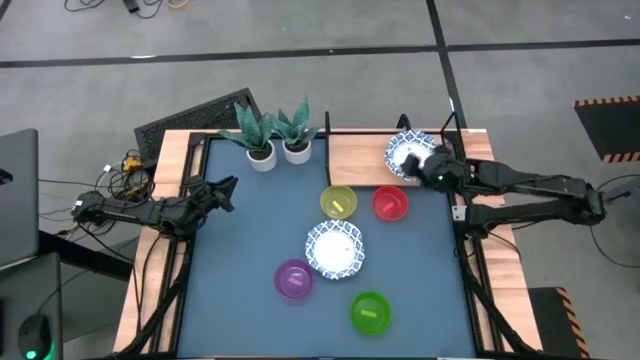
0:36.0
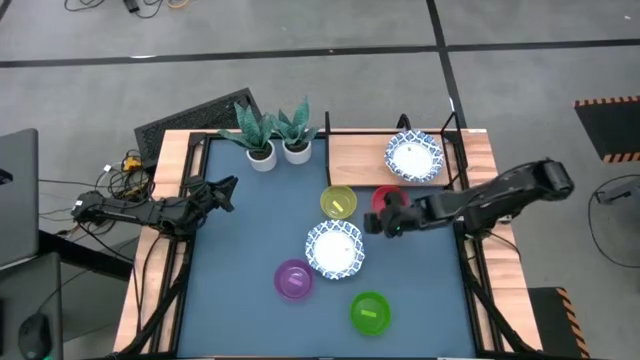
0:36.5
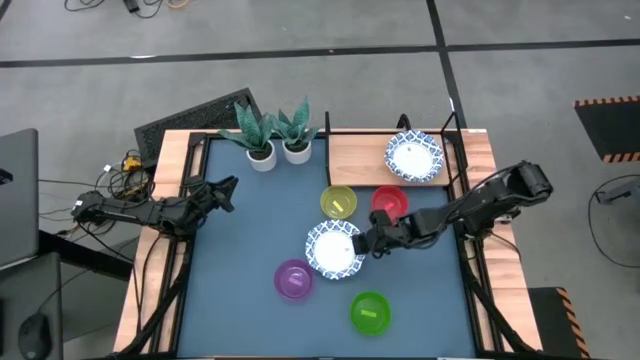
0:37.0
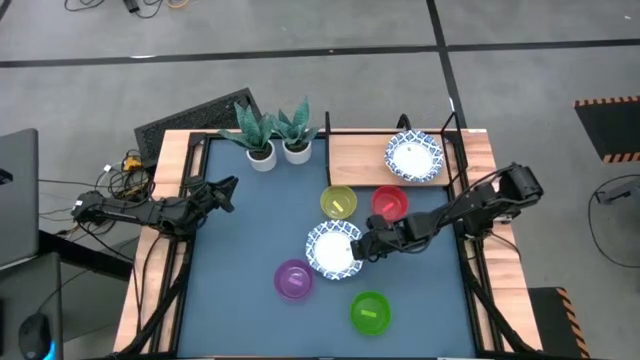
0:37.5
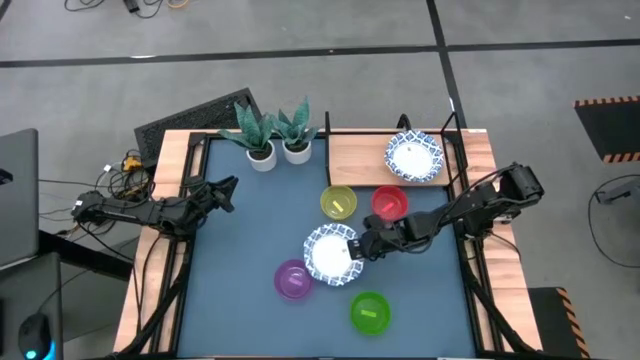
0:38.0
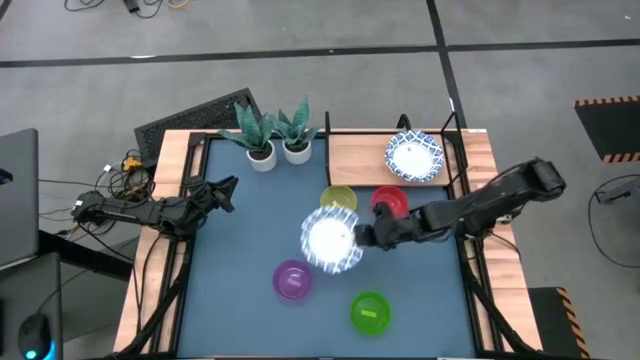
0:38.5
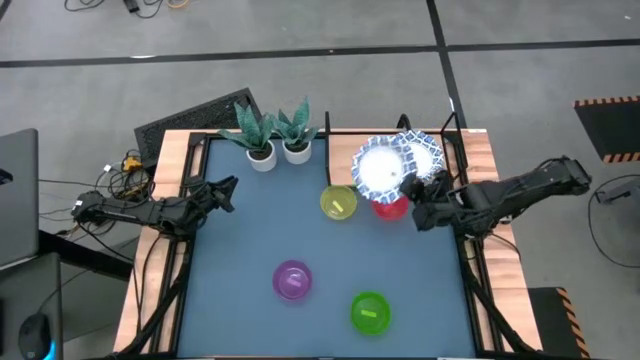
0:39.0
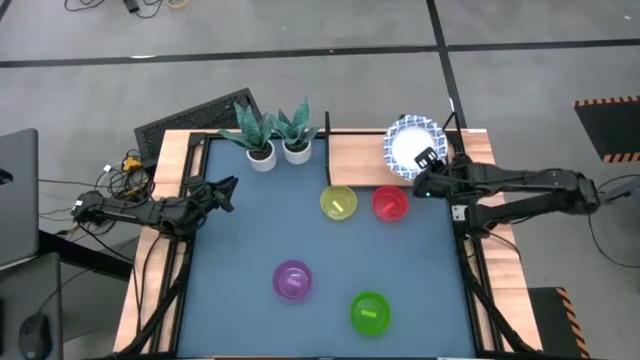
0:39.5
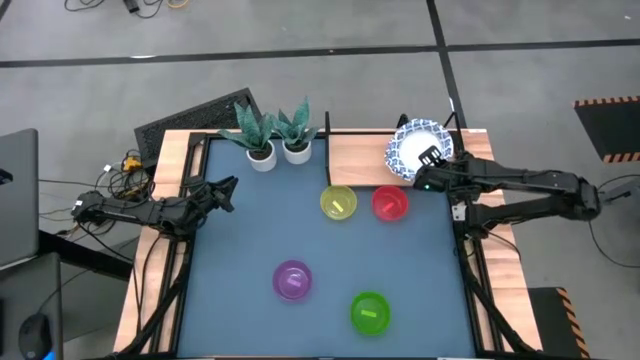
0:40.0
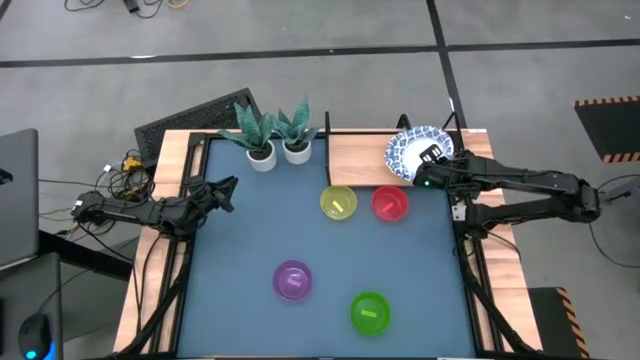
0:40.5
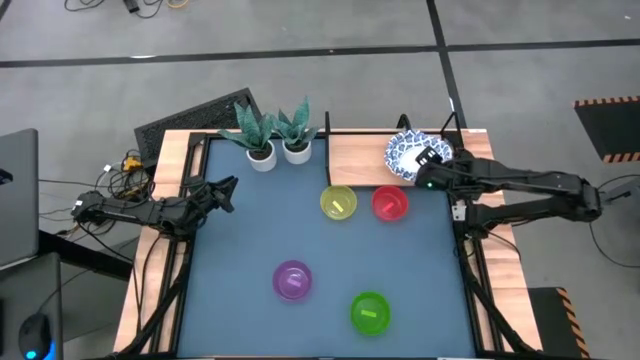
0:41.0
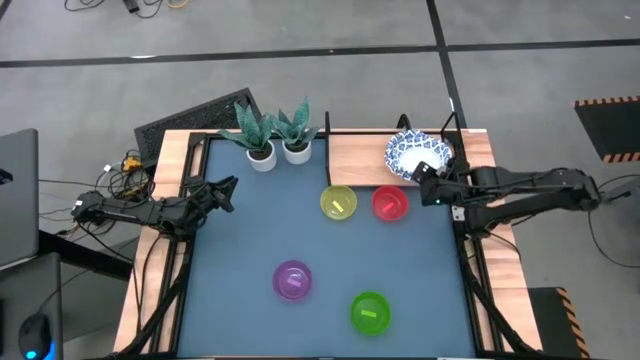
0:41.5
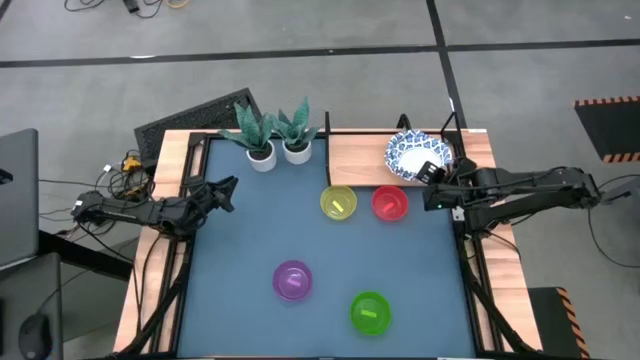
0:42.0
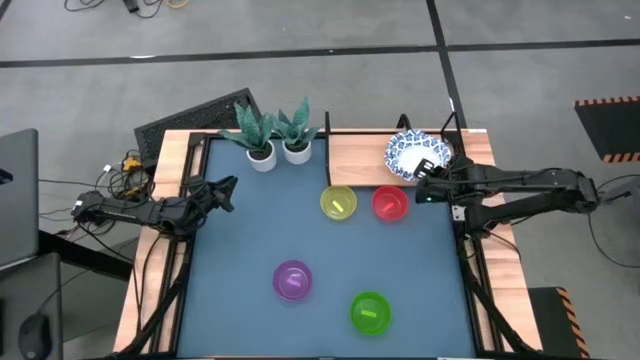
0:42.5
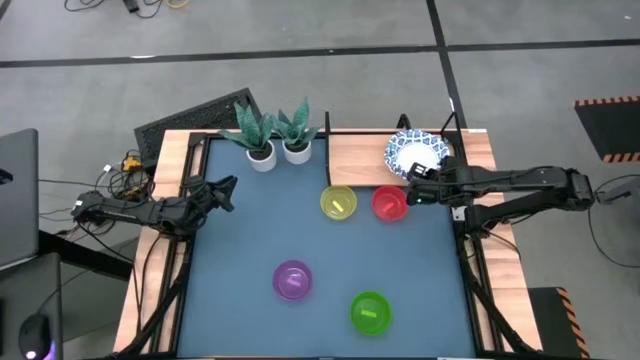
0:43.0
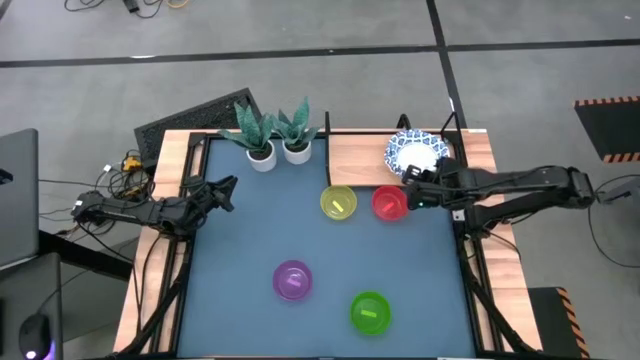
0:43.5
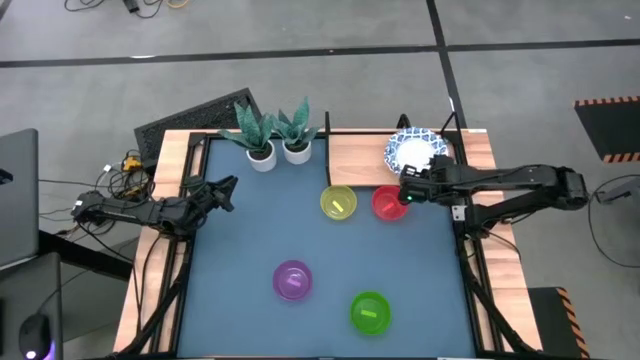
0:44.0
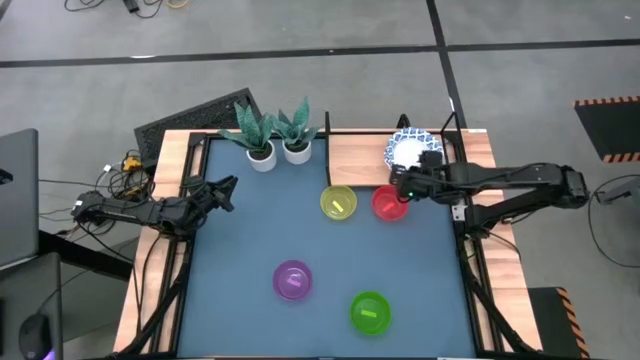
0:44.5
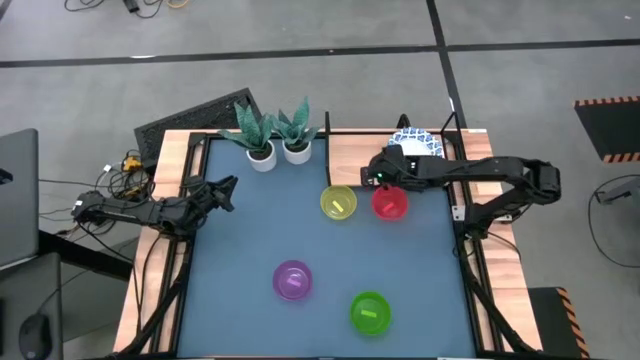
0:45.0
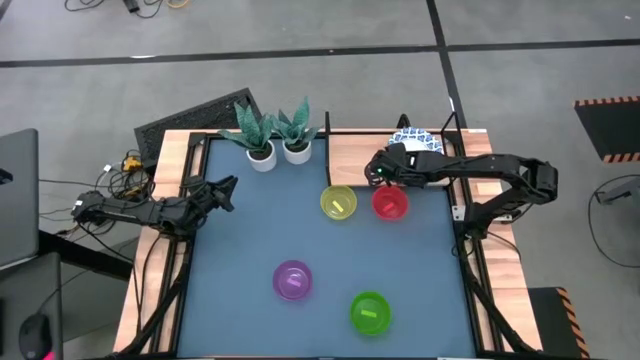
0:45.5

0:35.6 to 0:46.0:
Task: Place and stack bowls onto a shelf
Stack the white patterned bowl on the white patterned bowl on the shelf

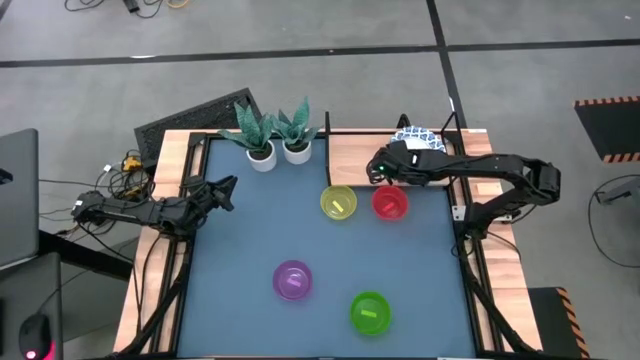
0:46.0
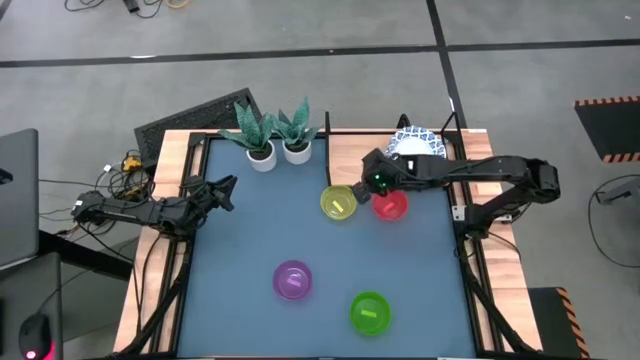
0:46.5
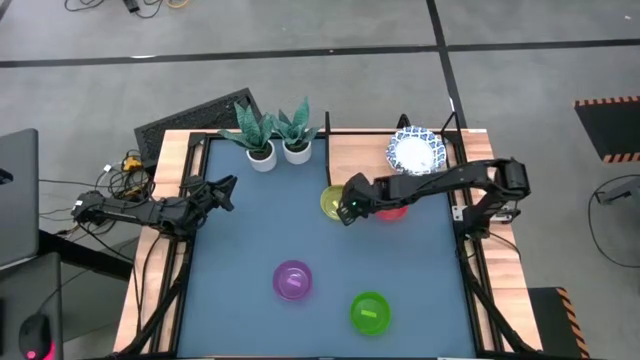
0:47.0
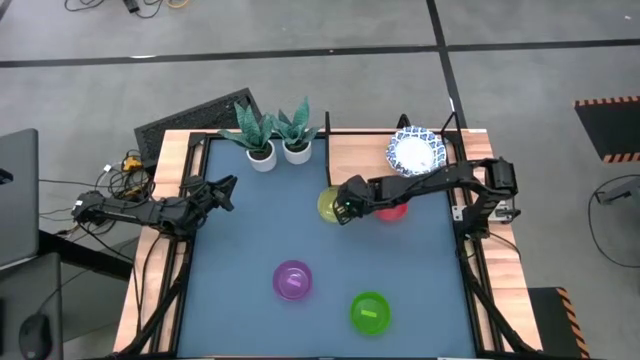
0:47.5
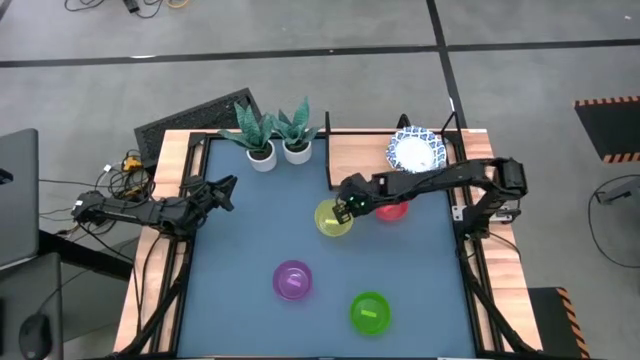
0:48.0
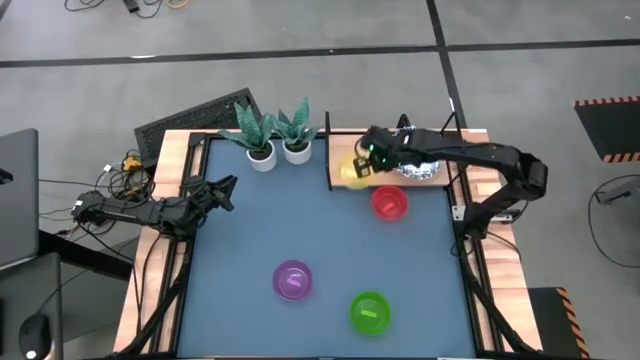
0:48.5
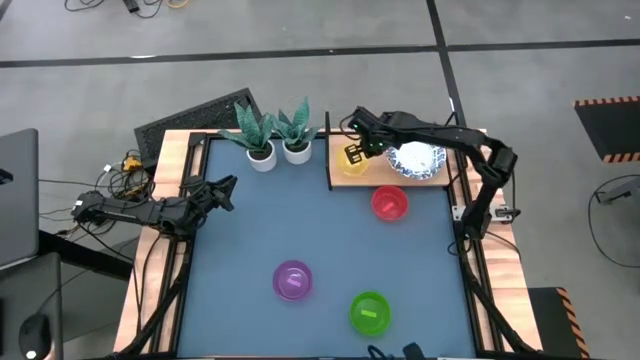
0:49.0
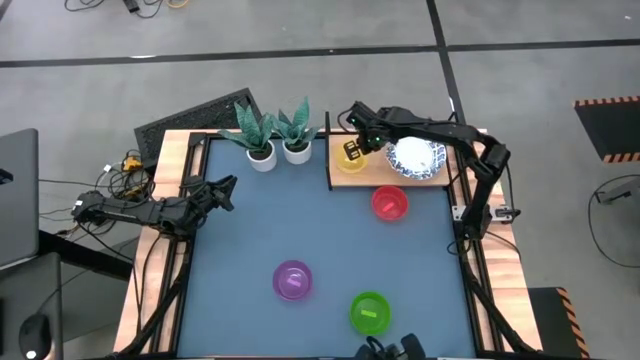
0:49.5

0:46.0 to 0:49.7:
Put the yellow bowl on the shelf

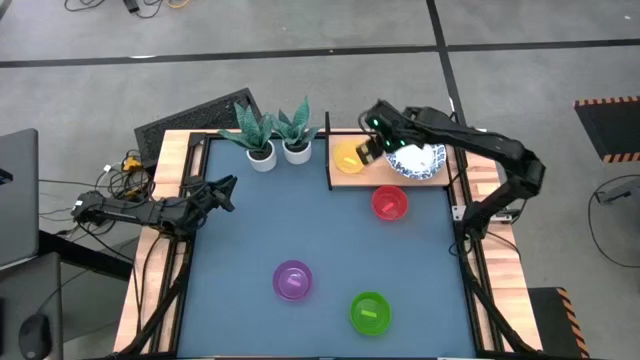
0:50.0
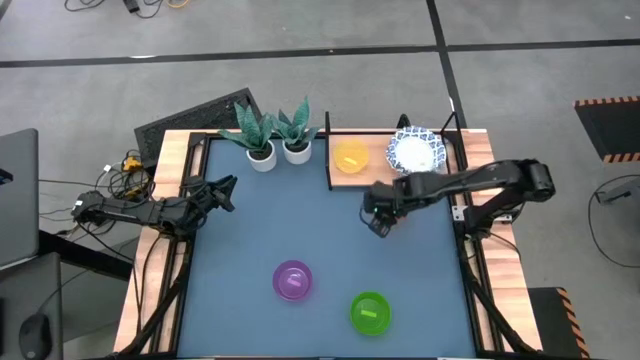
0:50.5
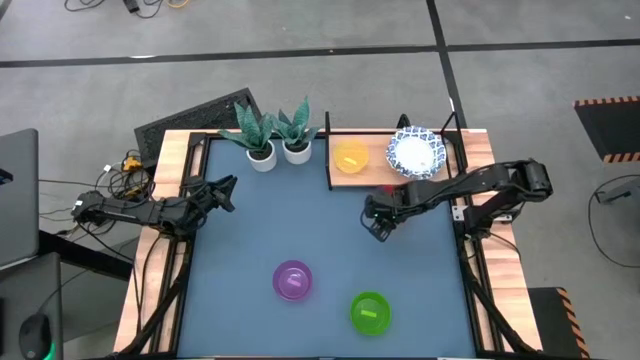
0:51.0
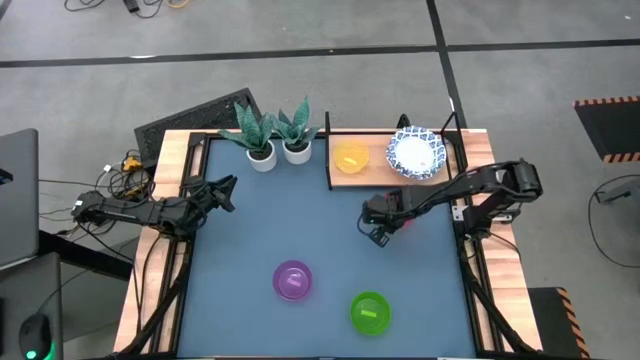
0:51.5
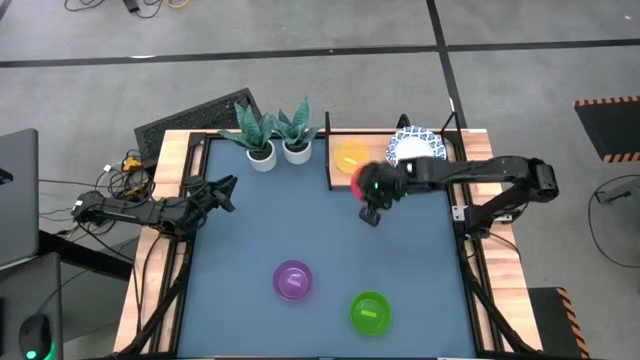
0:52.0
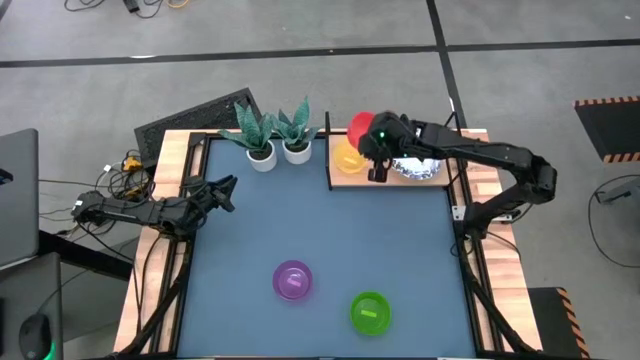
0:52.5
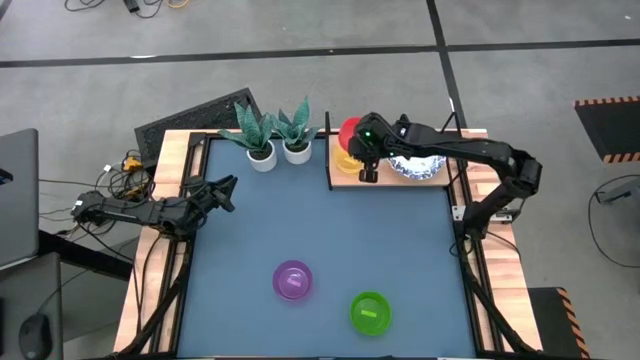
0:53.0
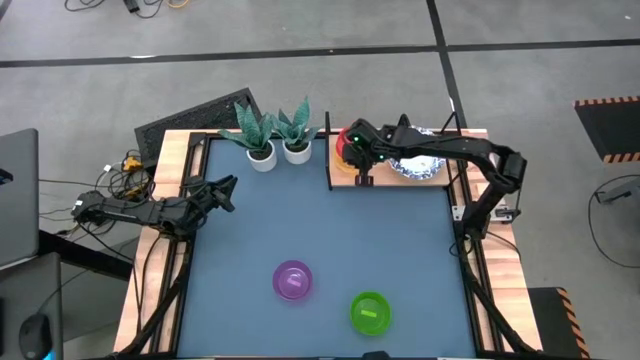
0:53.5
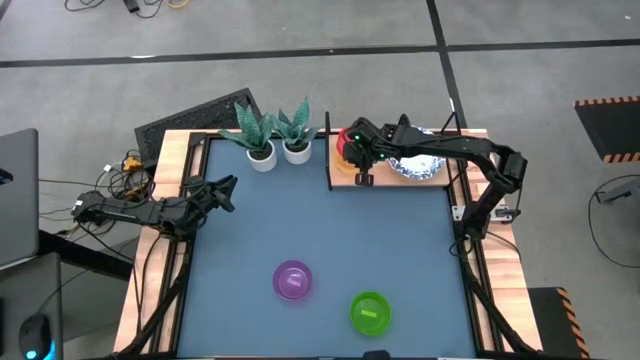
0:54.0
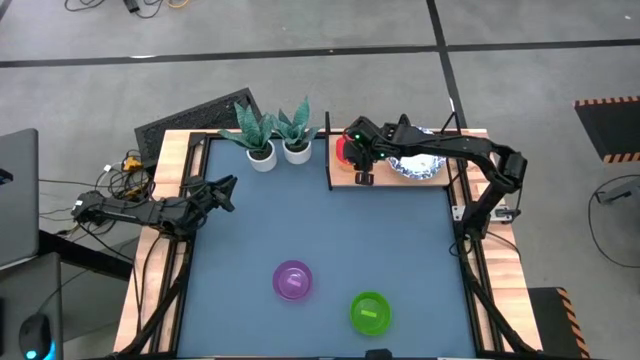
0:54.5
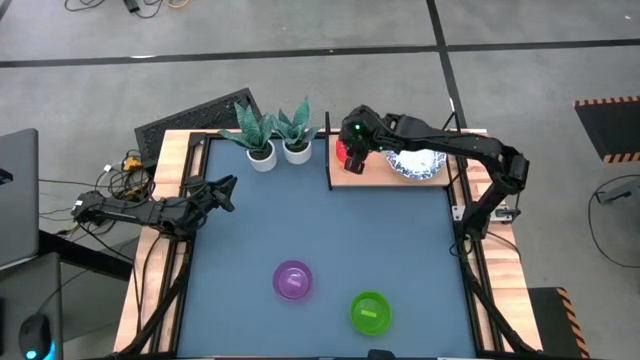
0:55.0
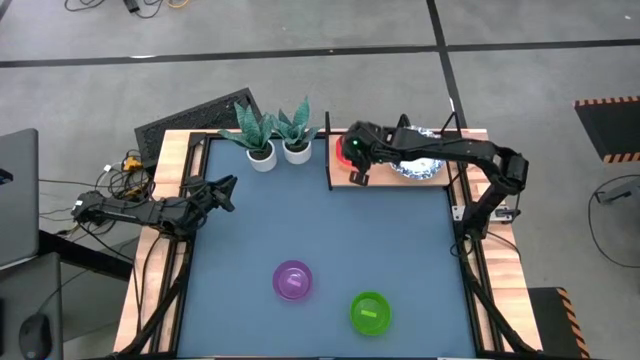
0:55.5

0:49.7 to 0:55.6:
Stack the red bowl on the yellow bowl on the shelf

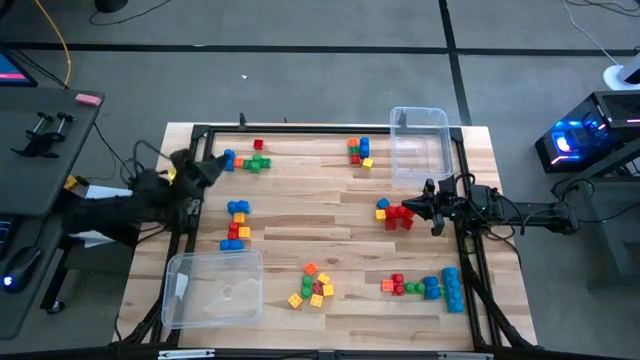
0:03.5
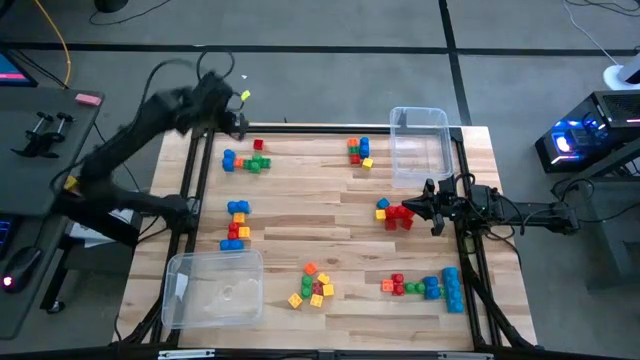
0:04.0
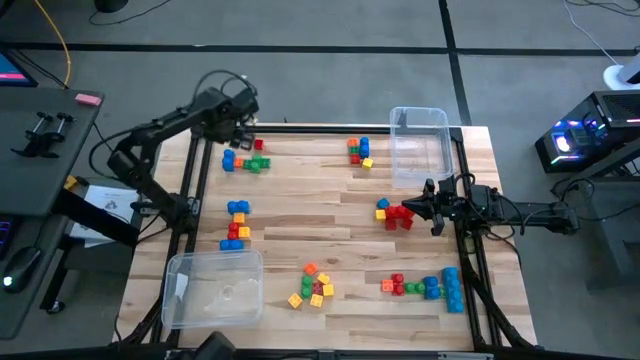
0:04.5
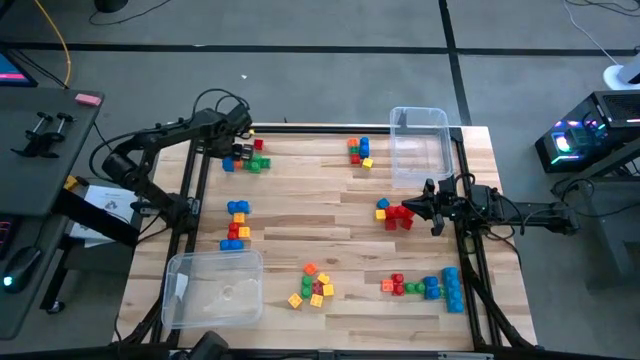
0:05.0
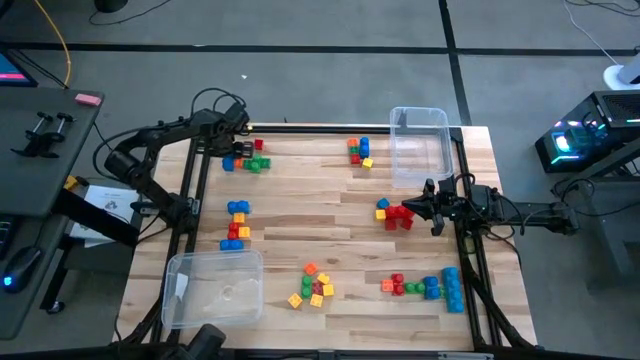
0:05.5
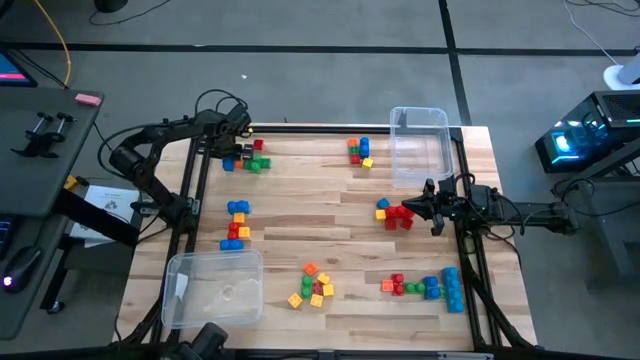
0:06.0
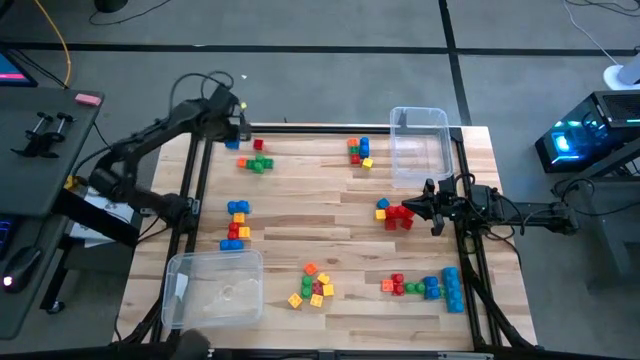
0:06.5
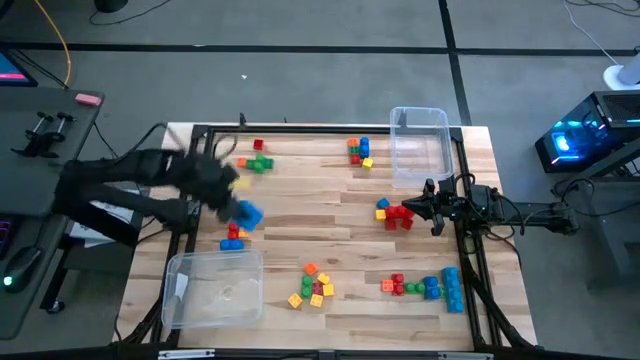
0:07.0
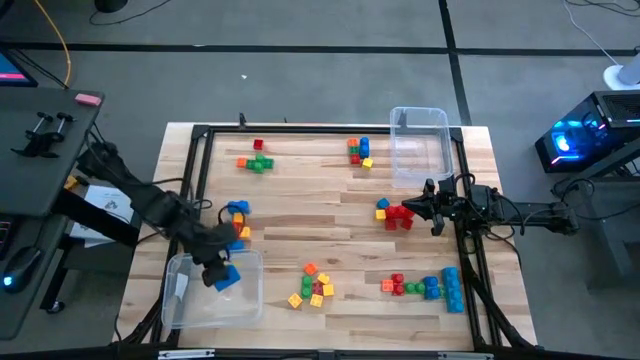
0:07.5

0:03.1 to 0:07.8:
Task: Sort blocks by size
Put the large blue game piece into the left transparent bin
